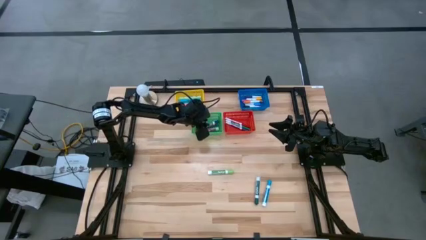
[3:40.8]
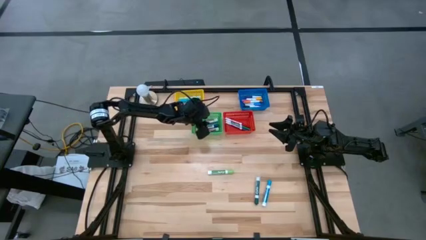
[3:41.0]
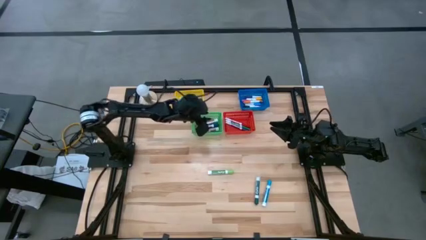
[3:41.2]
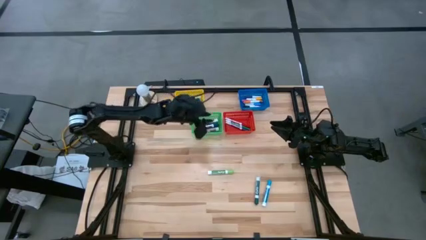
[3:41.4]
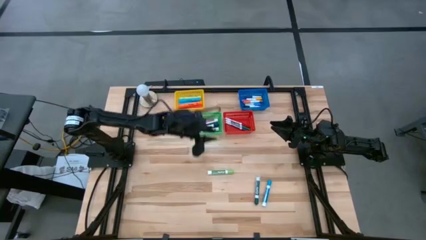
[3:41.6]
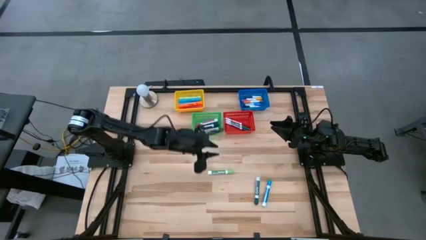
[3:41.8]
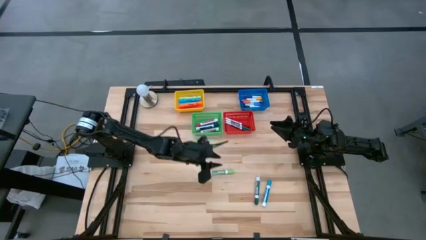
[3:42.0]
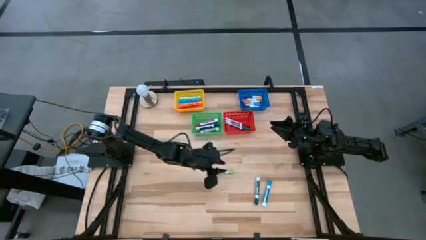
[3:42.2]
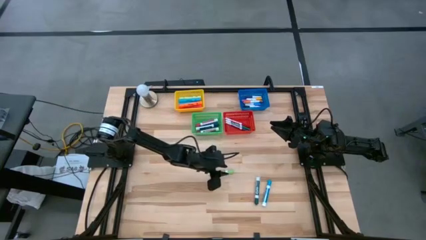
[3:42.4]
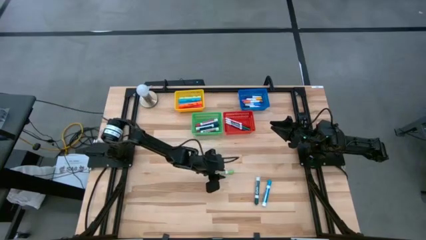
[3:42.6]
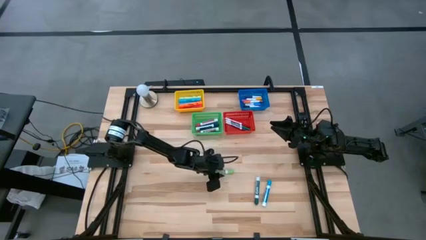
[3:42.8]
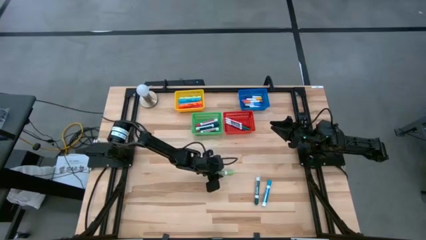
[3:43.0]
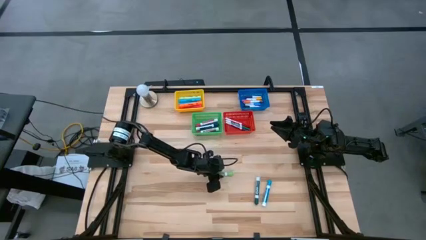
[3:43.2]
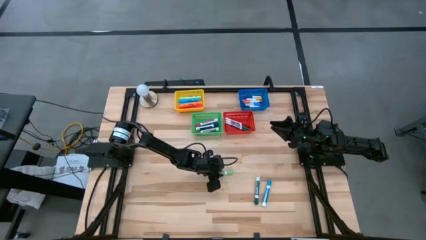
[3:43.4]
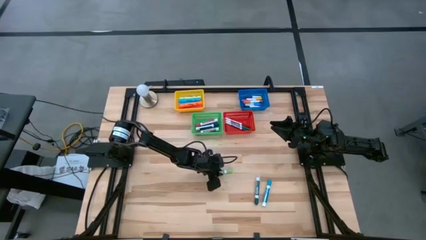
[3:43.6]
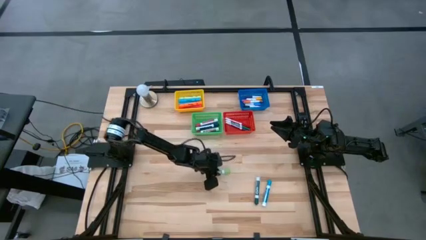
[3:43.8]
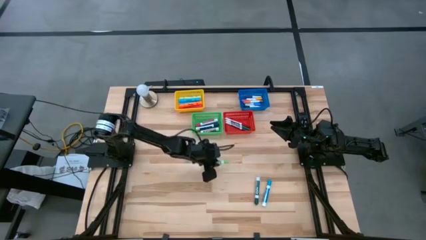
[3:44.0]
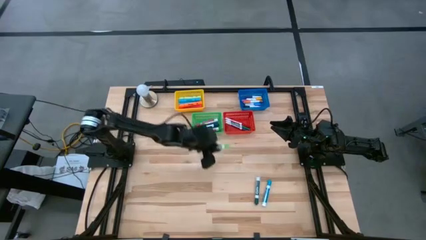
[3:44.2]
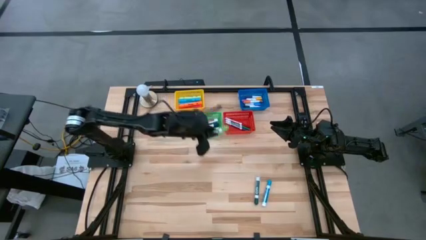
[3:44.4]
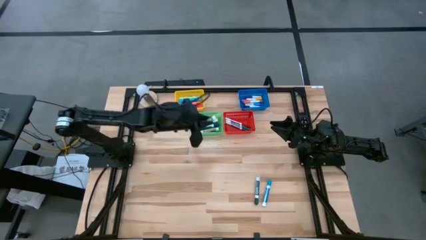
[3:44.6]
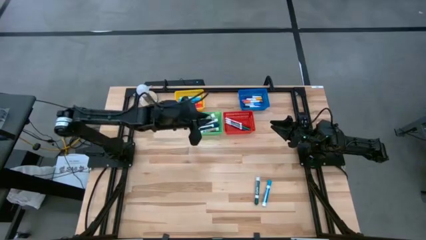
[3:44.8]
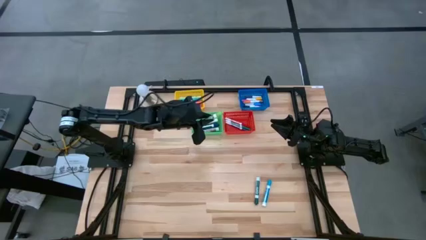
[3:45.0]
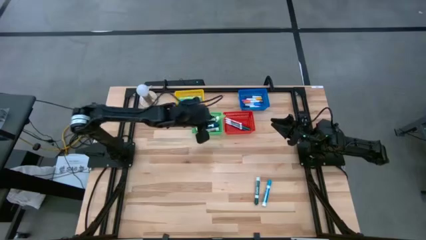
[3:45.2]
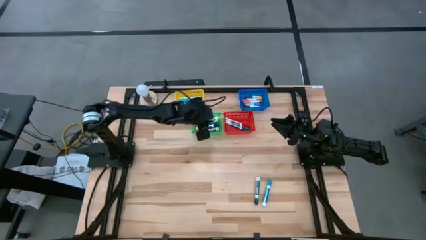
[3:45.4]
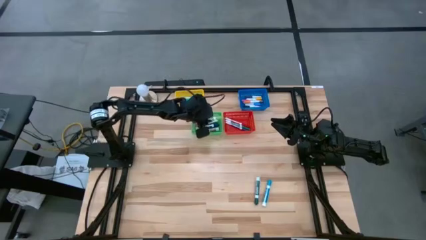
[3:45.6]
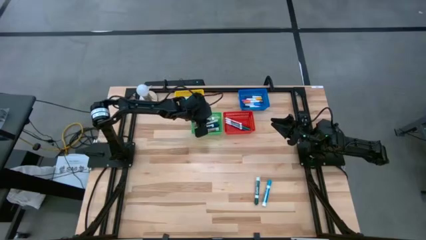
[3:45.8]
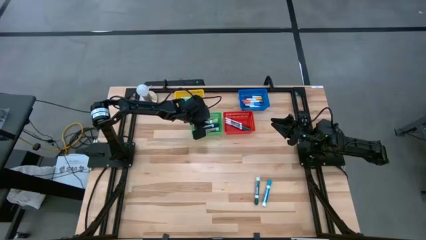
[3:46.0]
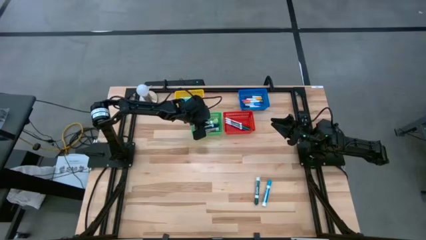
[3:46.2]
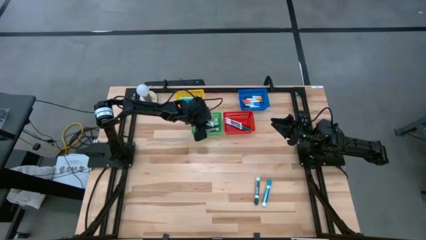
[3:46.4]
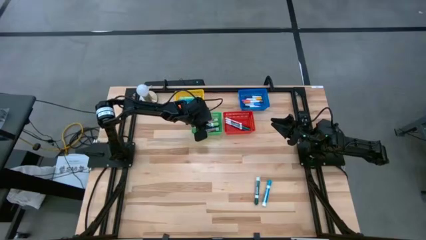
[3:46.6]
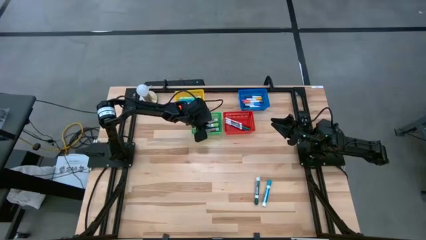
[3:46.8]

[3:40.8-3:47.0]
Task: Pick & Place Markers
Put the light green marker into the green bin

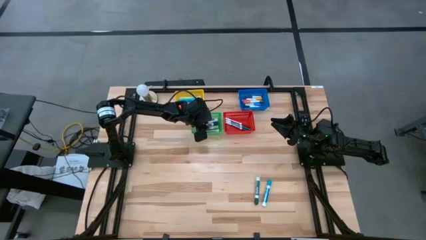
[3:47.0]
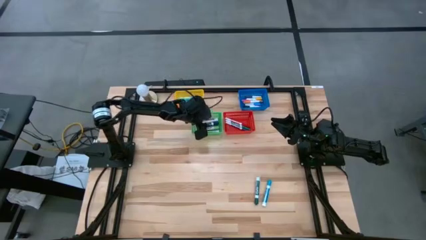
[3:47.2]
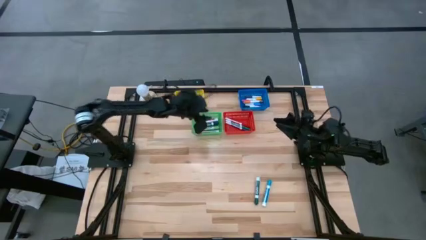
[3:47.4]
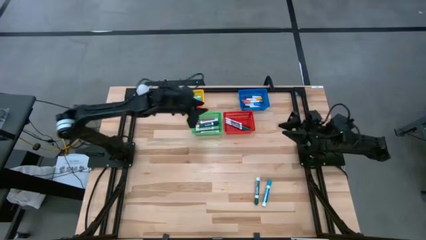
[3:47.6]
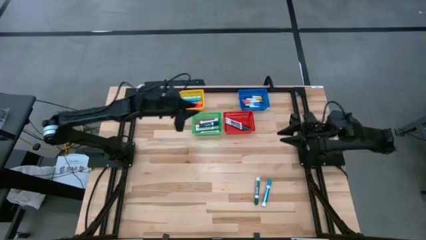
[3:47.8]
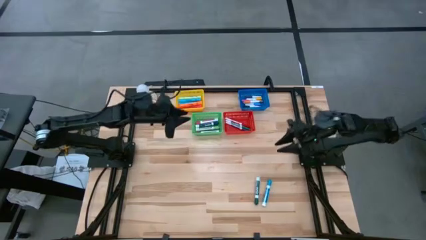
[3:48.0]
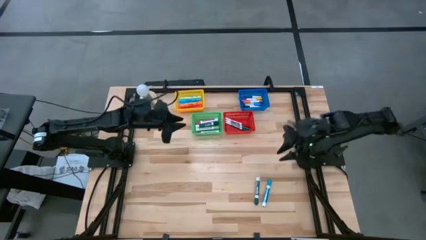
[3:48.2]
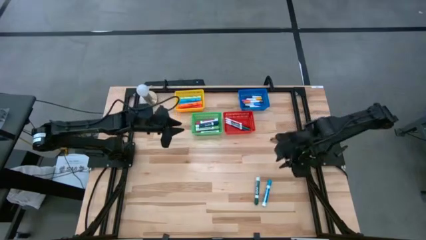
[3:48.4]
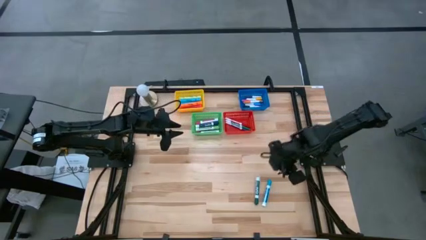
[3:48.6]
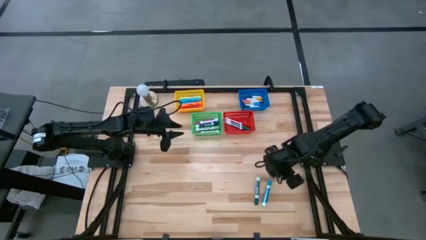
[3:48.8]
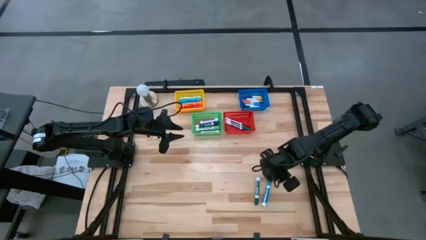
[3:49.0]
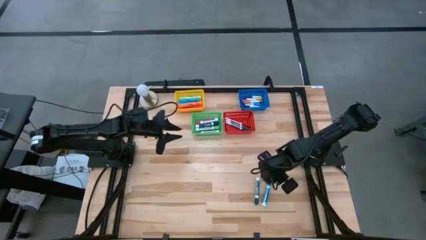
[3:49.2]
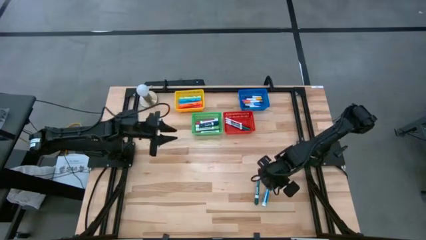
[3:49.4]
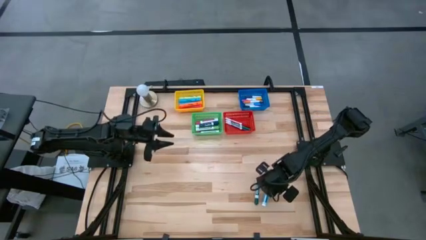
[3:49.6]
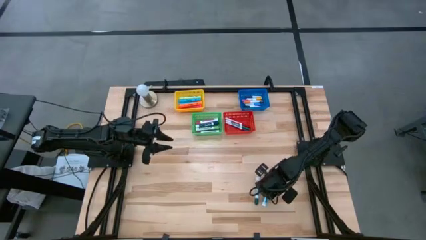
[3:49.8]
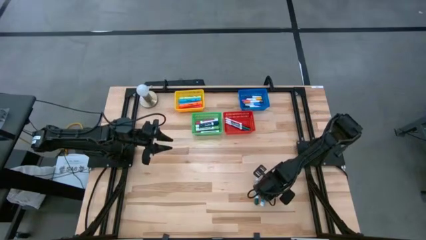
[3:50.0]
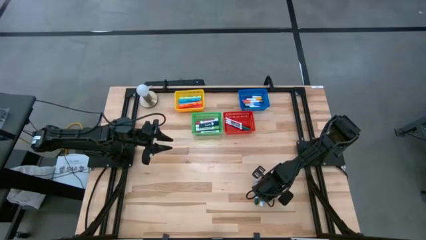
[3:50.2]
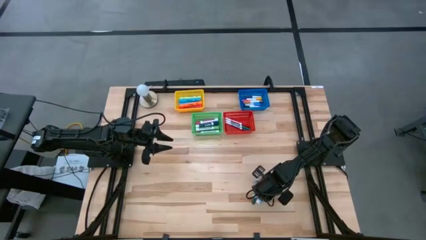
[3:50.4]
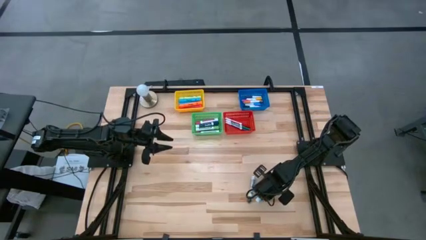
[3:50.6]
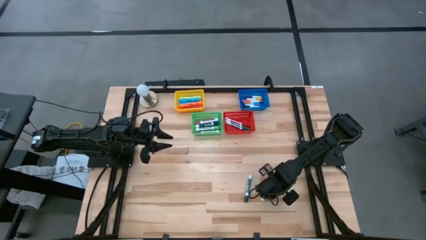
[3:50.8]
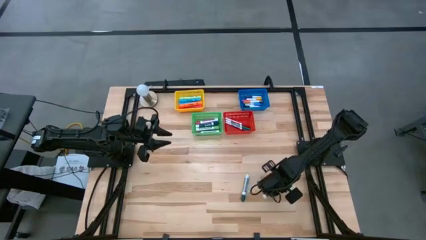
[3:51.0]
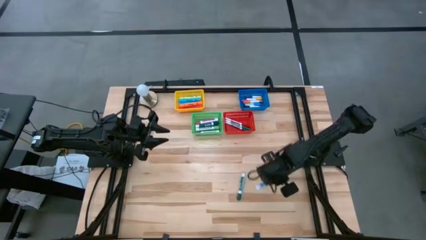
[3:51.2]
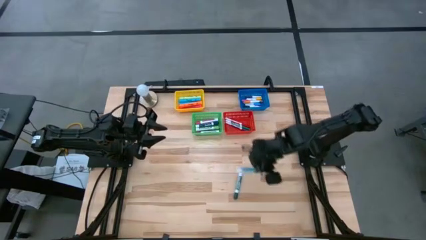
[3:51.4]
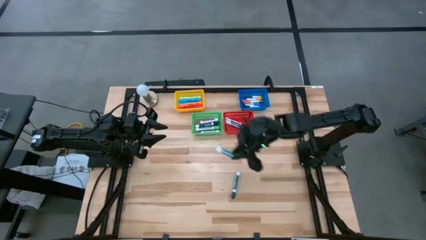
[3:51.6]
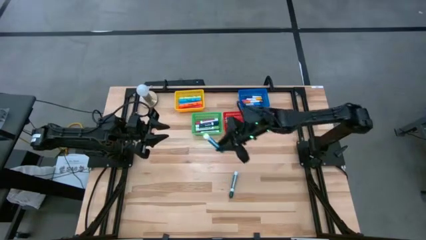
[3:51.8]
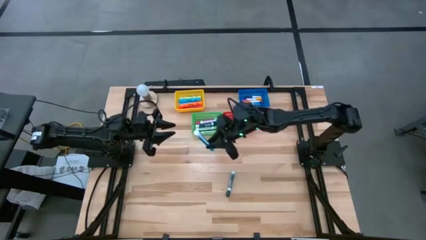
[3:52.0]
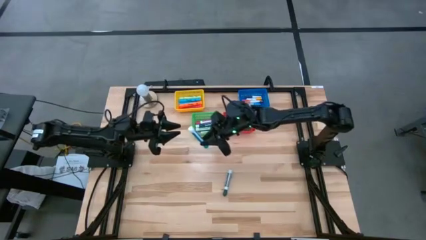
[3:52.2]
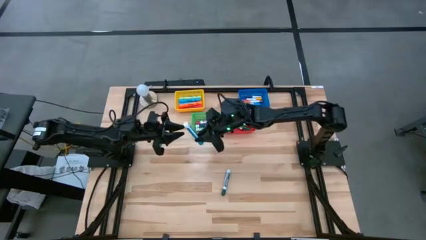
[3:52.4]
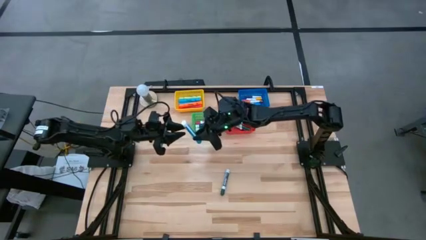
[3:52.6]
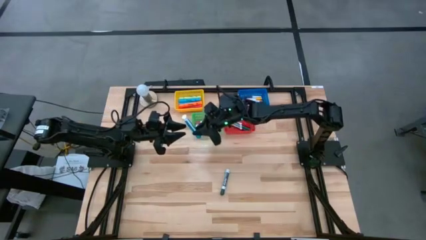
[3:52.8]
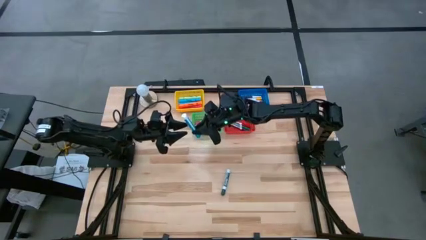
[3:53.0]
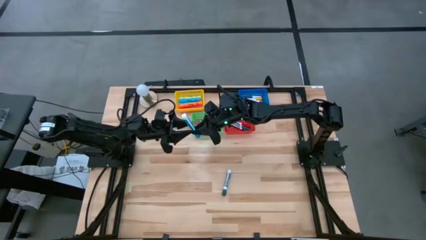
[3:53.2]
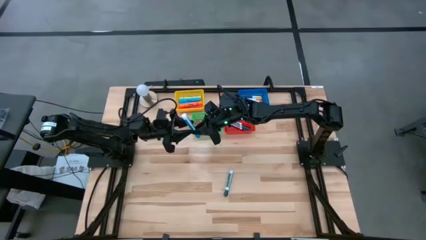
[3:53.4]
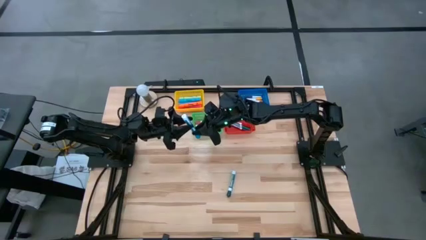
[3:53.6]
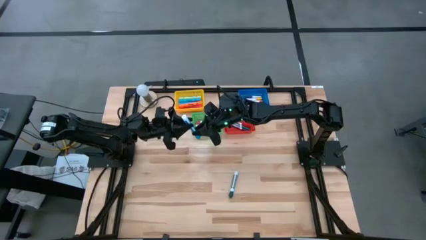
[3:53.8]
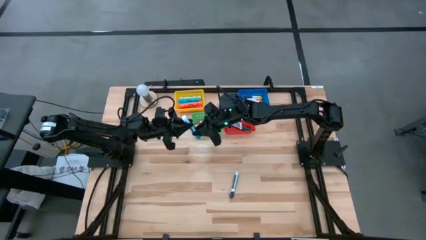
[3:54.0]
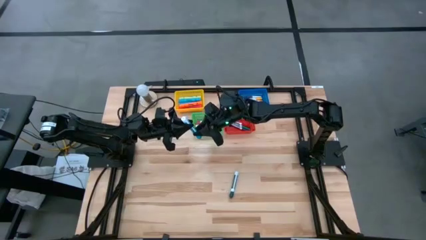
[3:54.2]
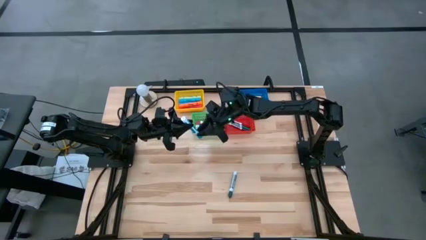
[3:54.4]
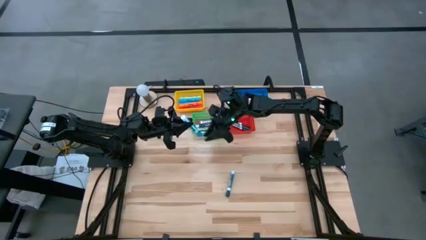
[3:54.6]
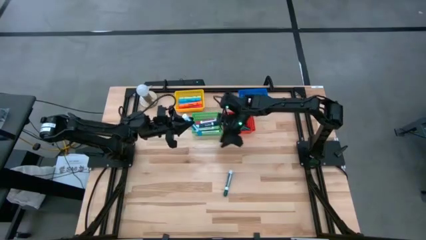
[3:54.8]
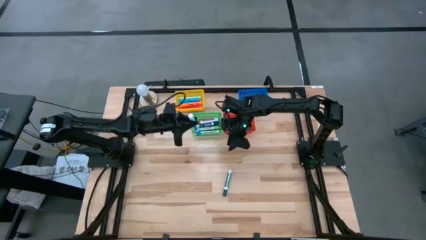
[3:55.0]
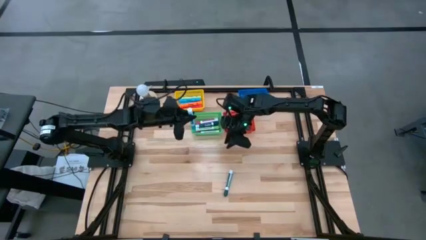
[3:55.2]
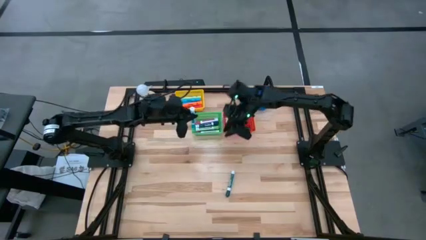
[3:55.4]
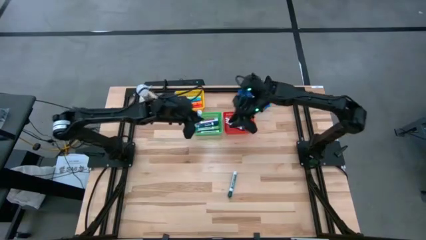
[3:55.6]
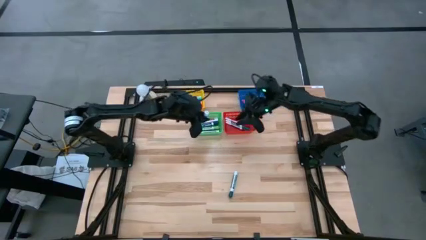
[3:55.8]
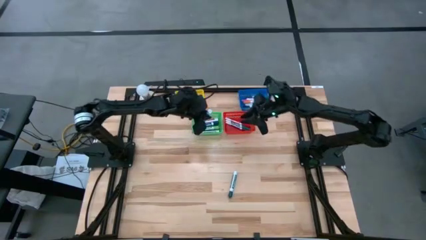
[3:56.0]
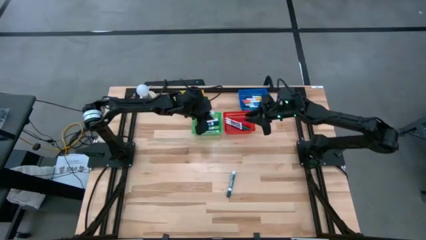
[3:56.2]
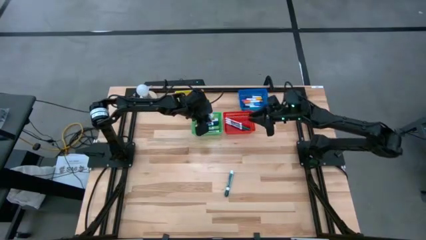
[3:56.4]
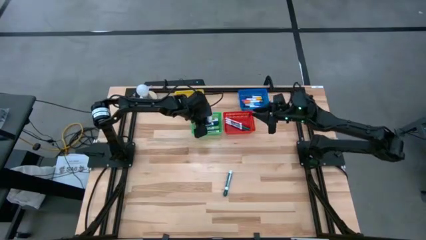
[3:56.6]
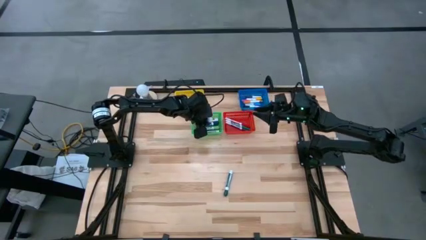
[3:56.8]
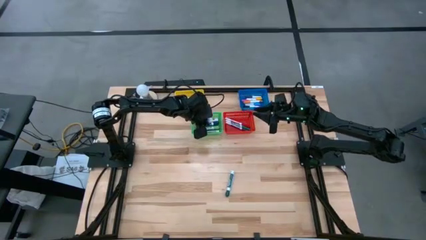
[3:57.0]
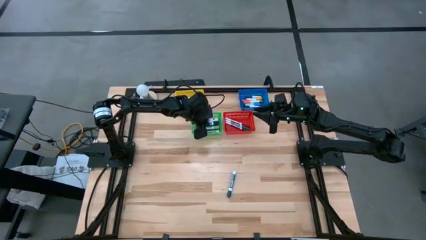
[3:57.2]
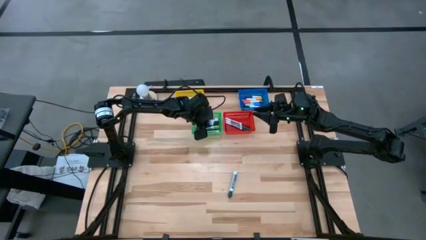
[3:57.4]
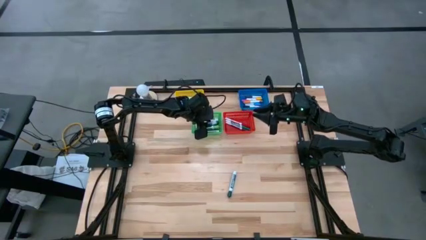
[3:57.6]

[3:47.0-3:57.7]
Put the blue marker into the green bin
